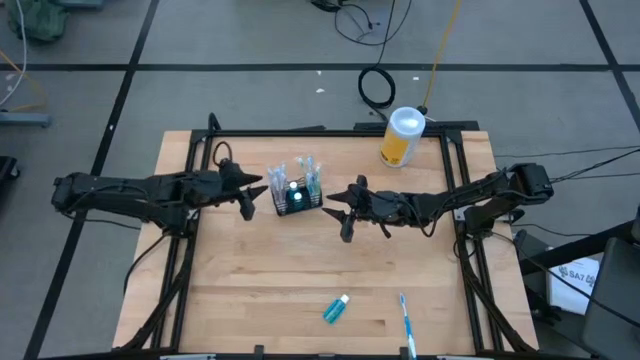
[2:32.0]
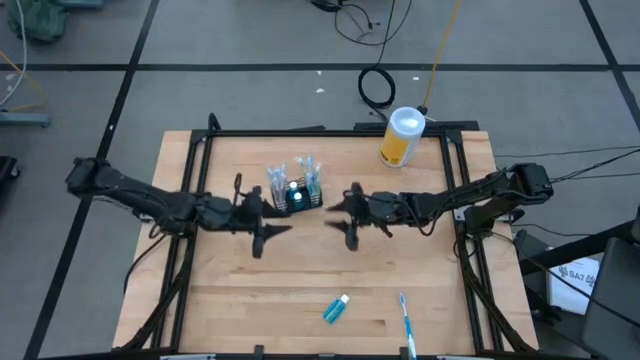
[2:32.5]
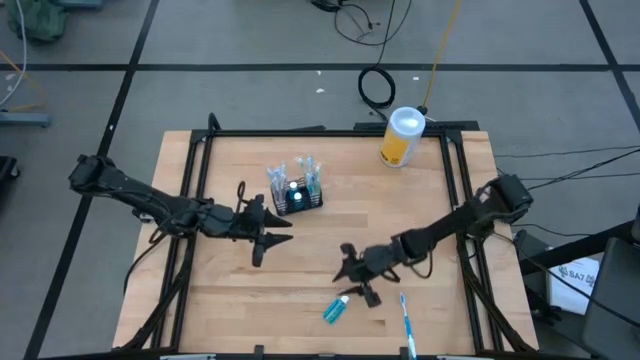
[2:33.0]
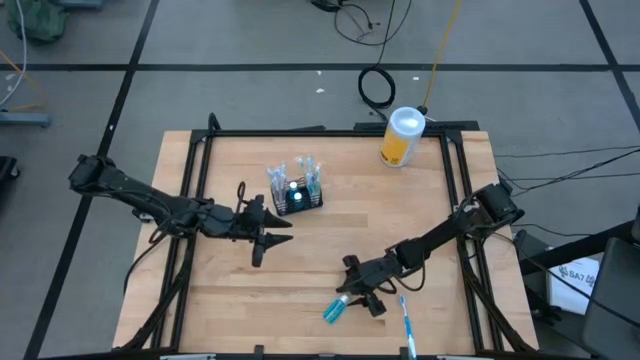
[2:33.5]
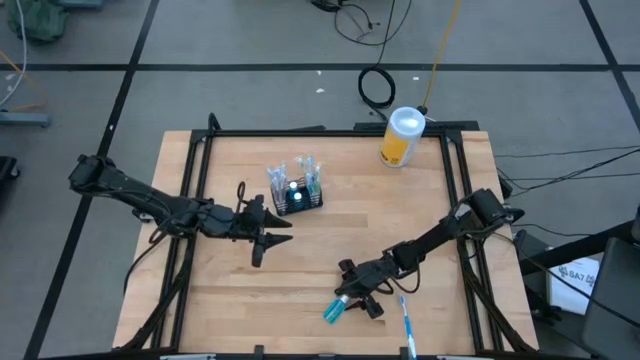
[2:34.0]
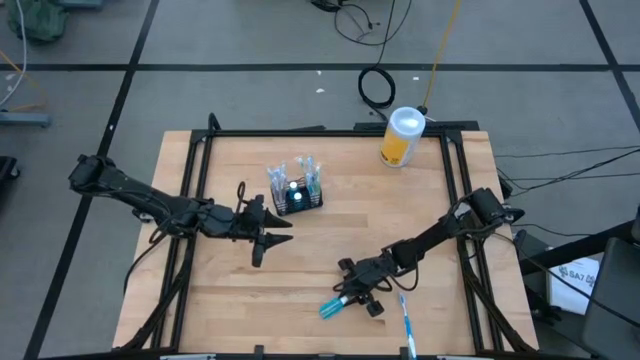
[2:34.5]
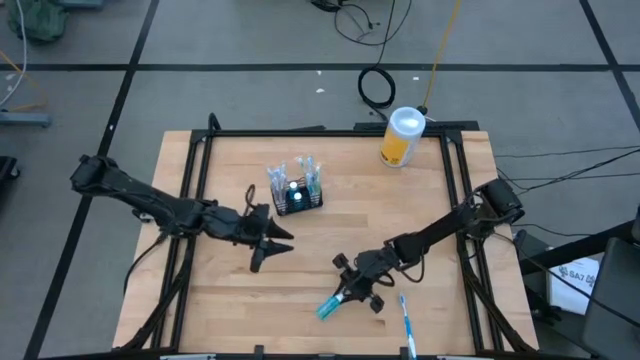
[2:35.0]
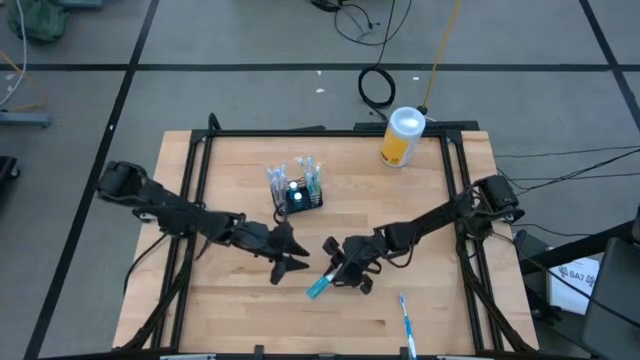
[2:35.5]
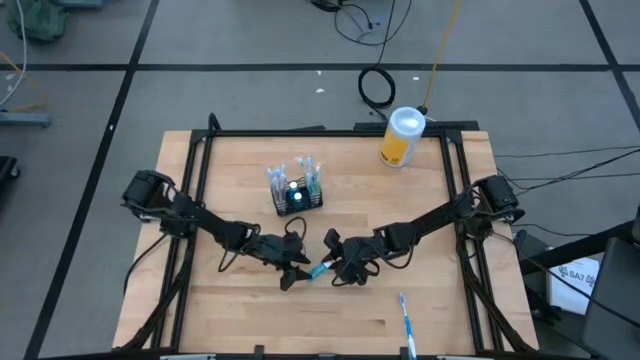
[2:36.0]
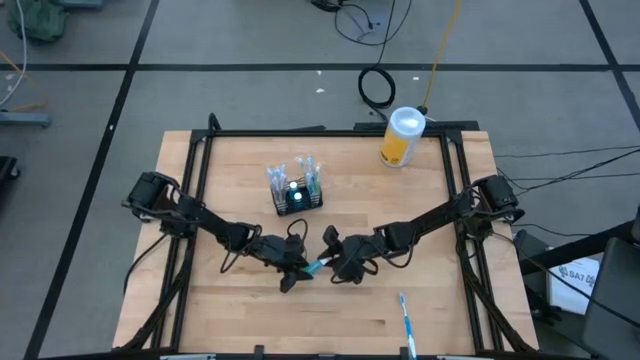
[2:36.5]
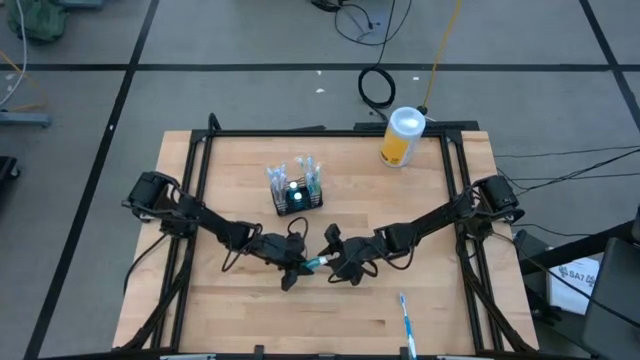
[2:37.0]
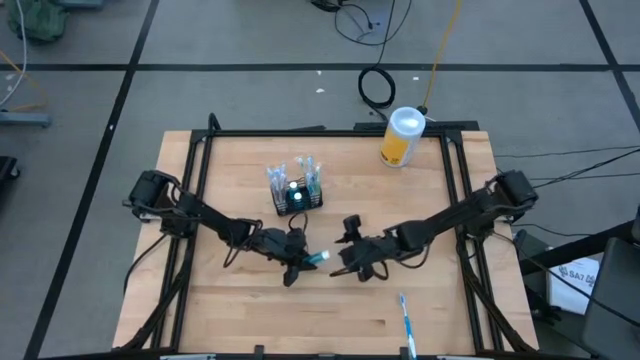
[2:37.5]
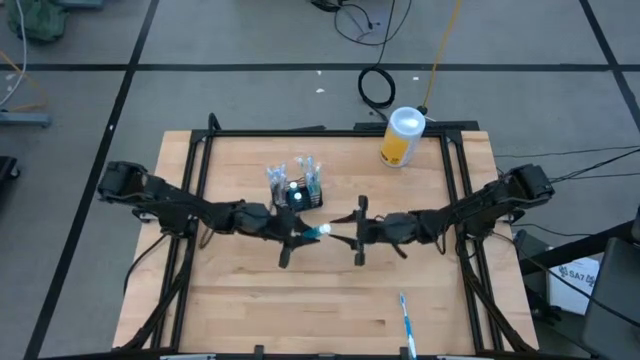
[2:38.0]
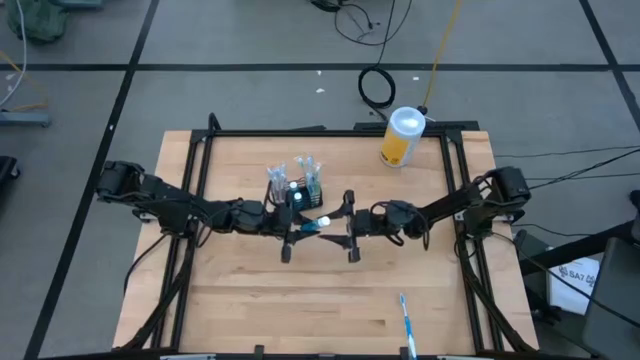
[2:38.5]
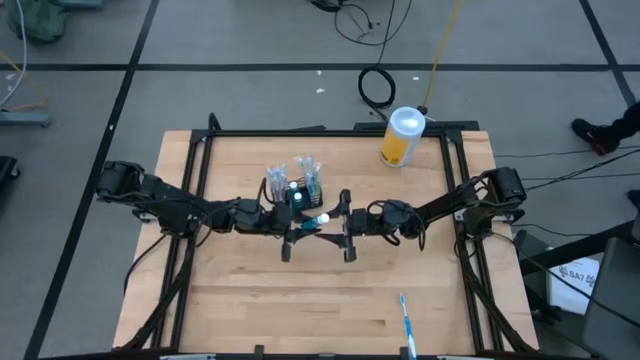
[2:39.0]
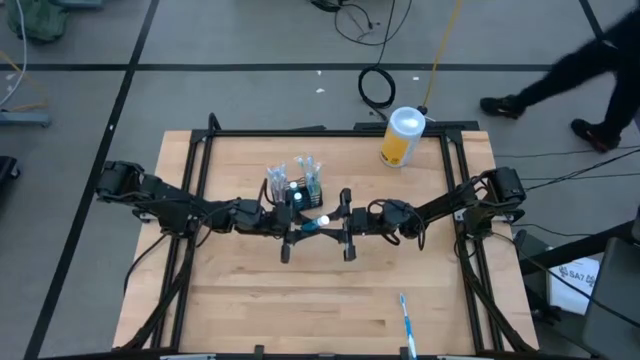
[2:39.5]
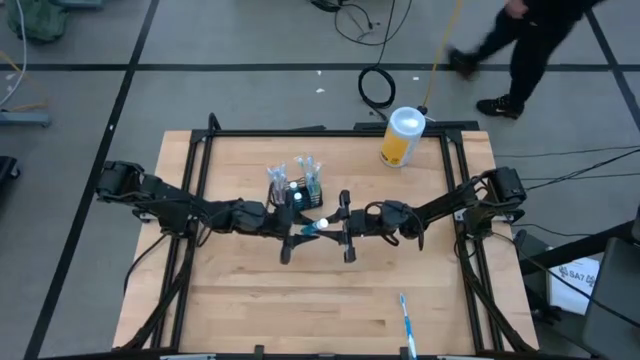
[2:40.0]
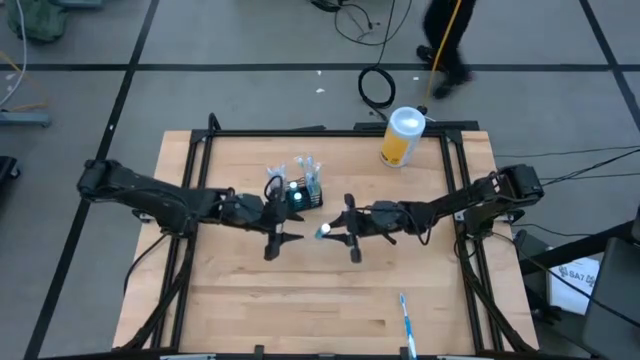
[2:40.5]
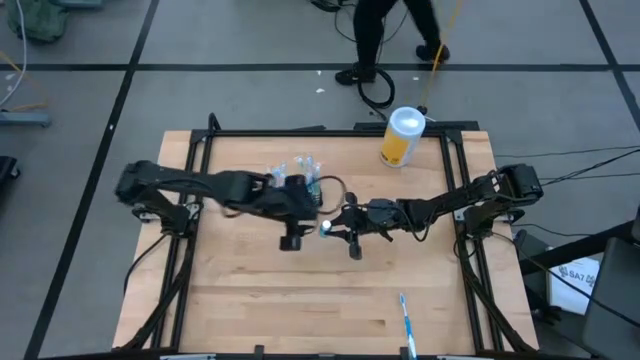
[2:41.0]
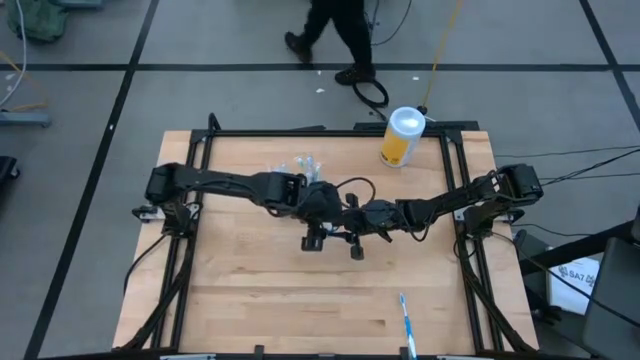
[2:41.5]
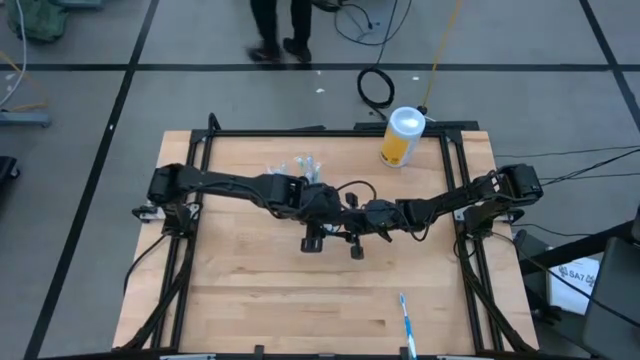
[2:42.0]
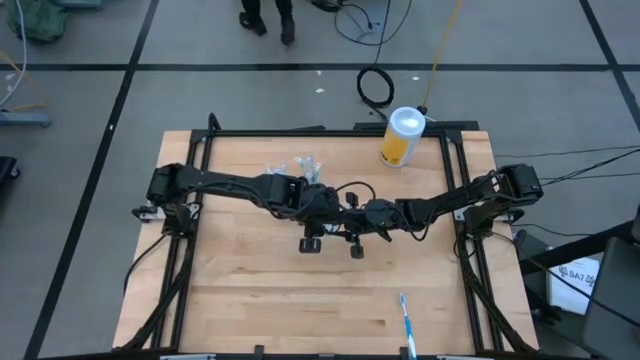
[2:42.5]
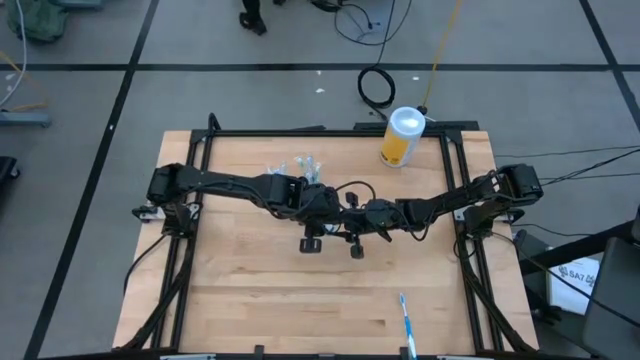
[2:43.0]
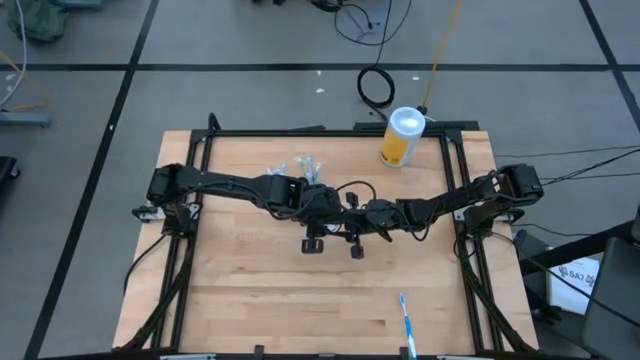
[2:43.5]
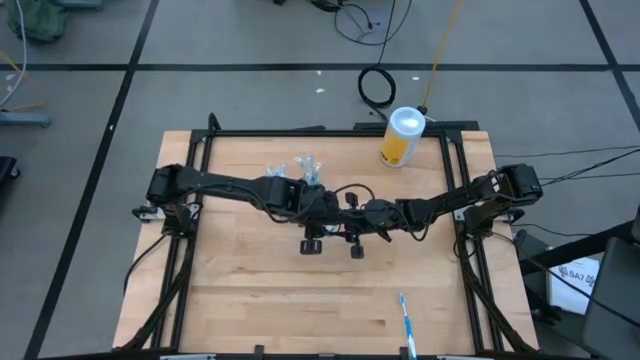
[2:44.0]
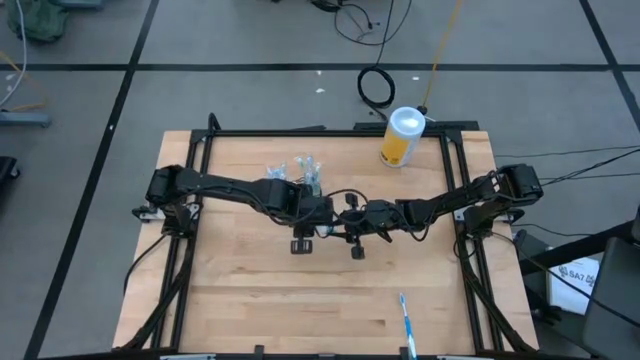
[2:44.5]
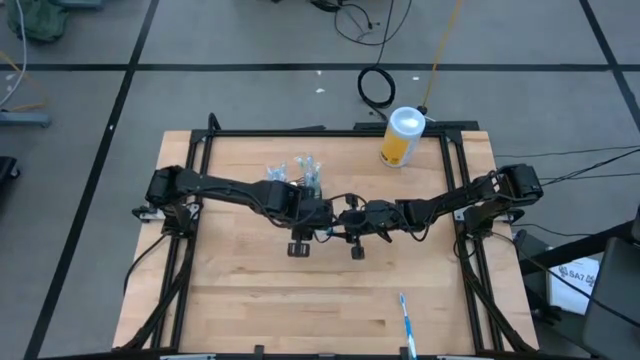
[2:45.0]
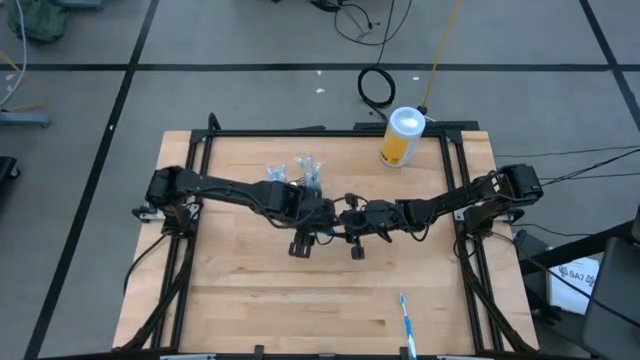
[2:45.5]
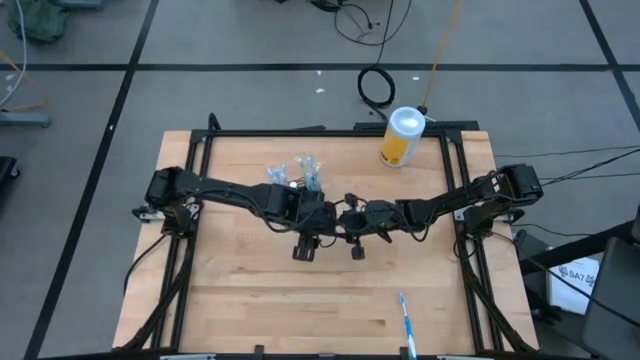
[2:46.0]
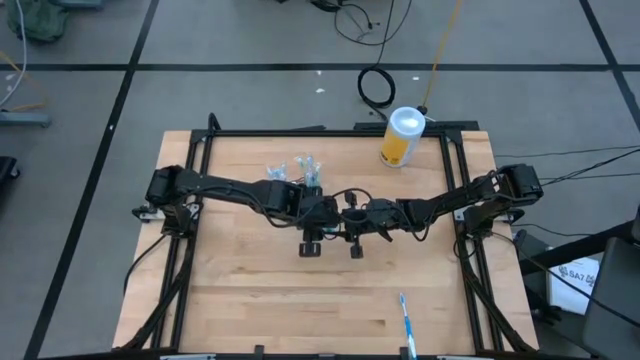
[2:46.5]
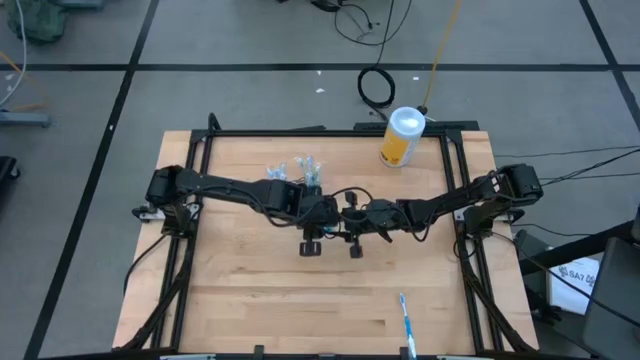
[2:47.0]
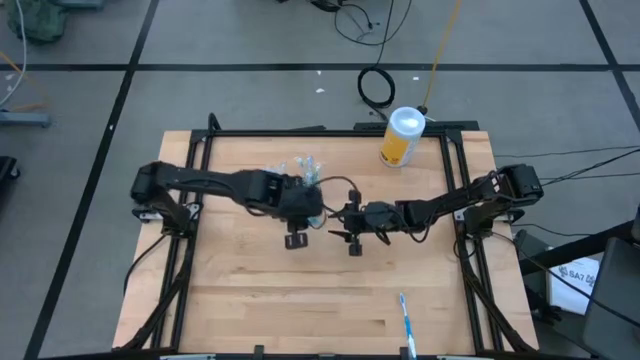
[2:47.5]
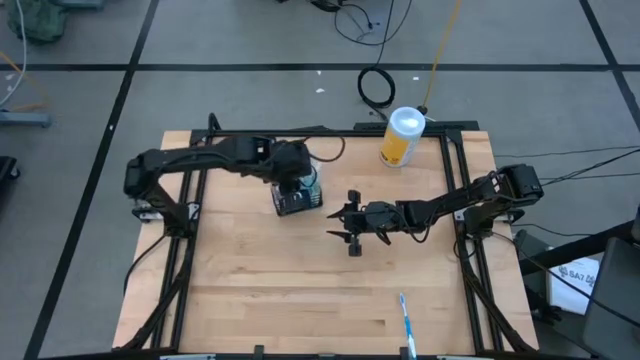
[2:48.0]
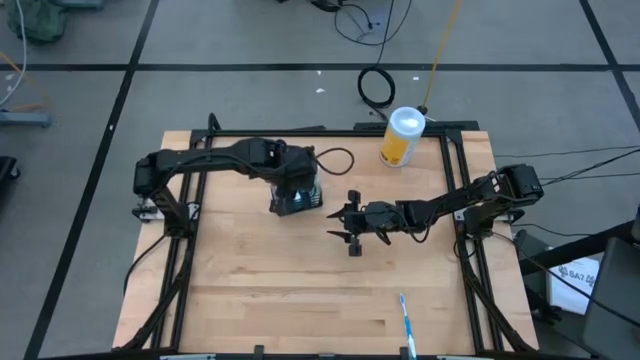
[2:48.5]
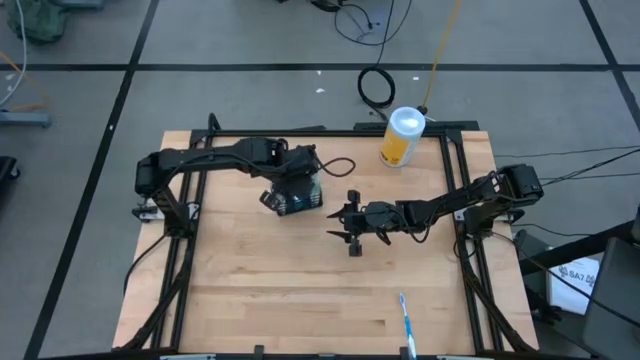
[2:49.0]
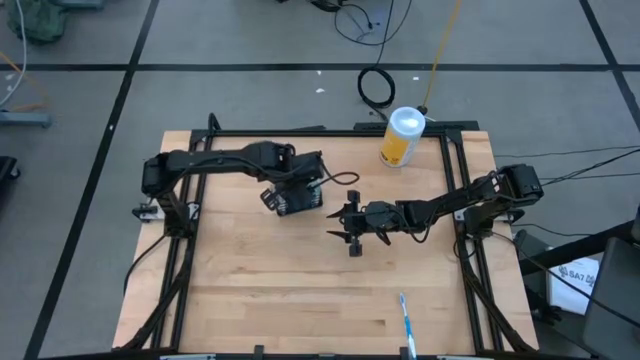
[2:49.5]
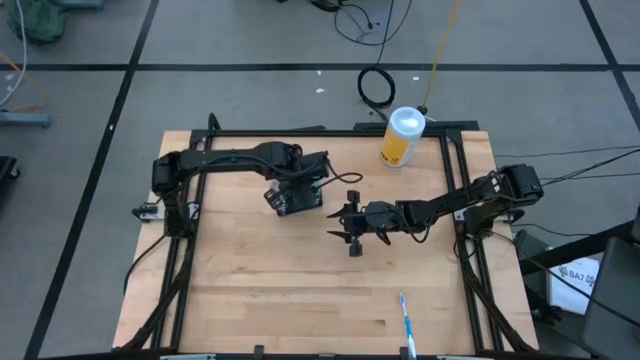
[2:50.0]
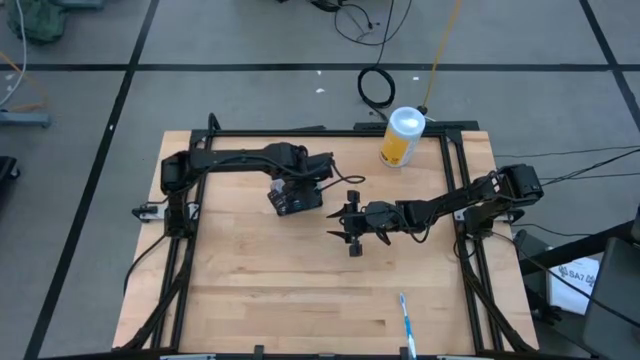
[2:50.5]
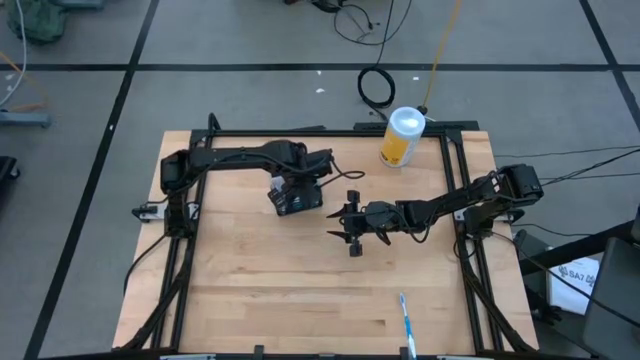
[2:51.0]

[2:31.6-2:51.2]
Task: Pick & Place toothbrushing station
Put the blue mouthwash into the black mesh organizer

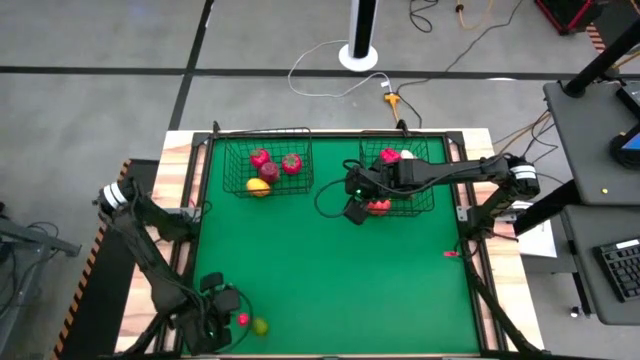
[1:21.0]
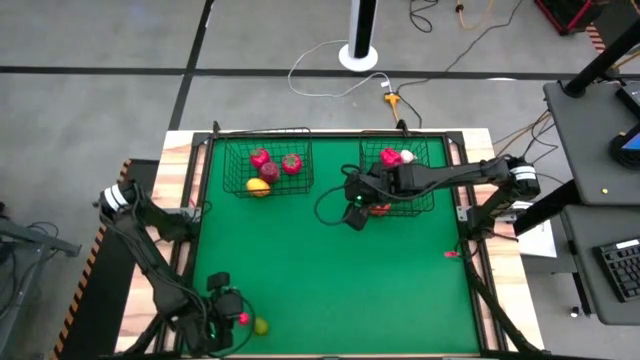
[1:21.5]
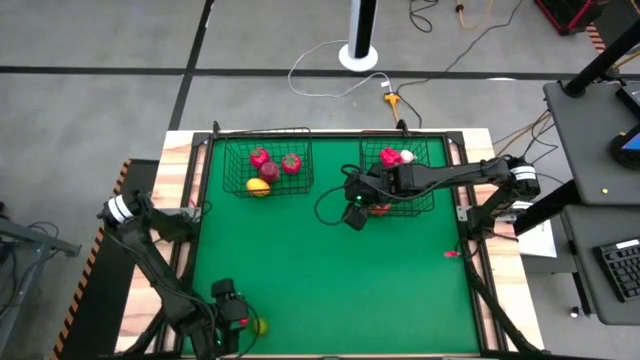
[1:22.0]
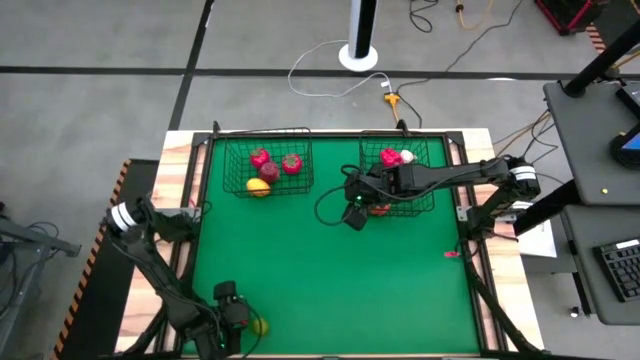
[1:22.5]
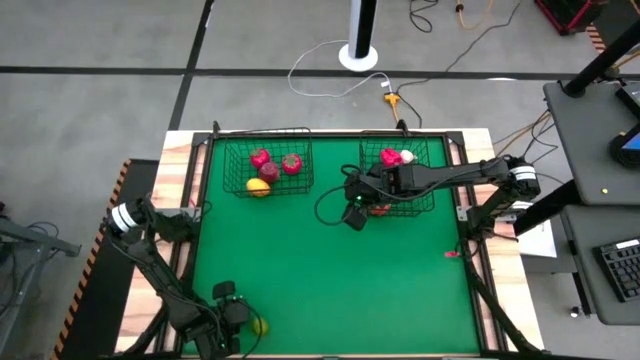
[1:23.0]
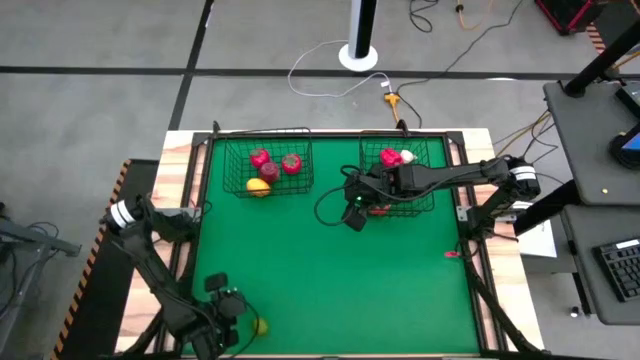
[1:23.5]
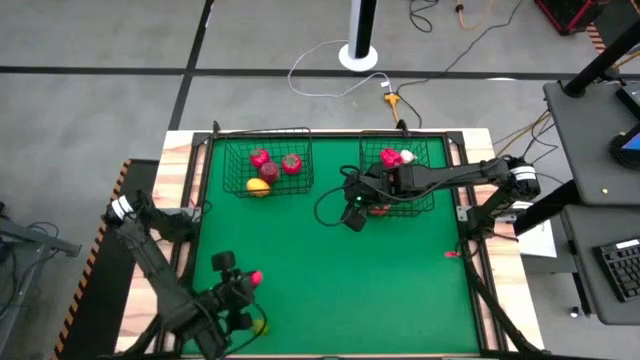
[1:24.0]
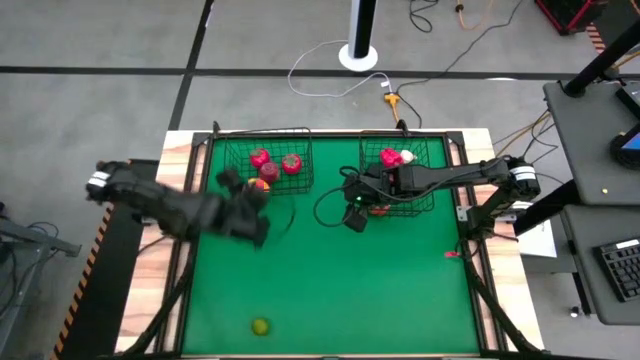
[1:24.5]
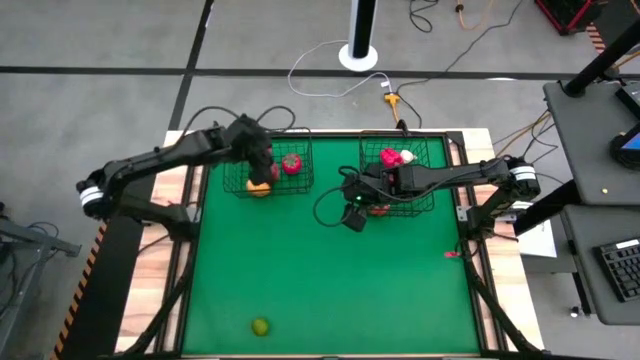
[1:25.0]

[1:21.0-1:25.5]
Task: Sort produce into baskets
Put the red strawberry into the left wire basket
